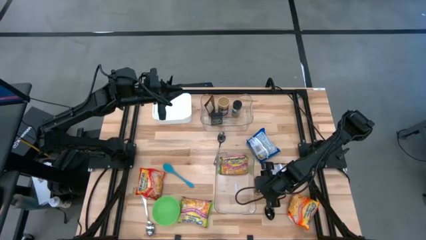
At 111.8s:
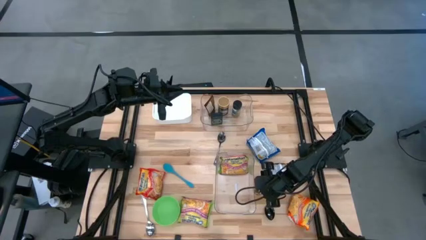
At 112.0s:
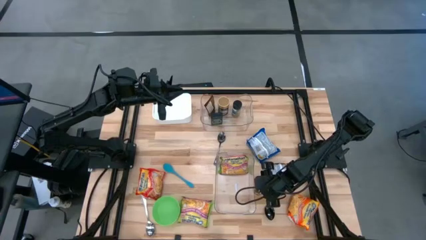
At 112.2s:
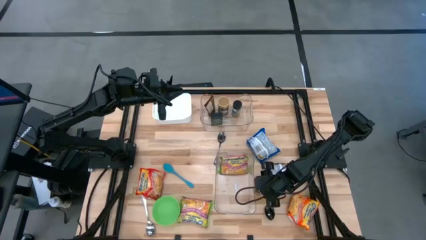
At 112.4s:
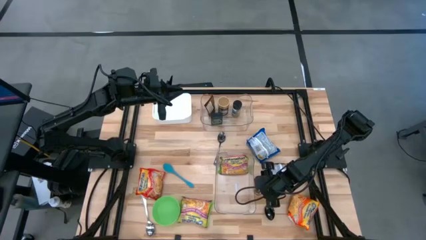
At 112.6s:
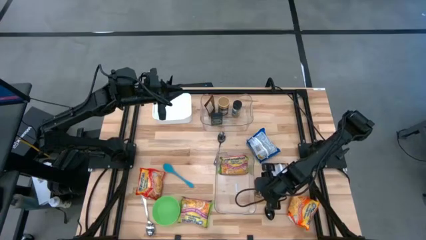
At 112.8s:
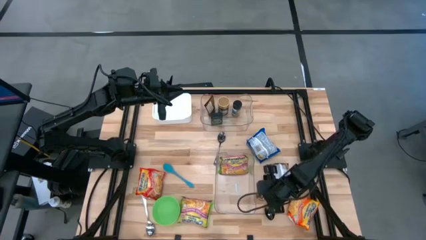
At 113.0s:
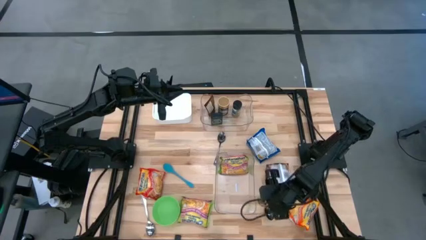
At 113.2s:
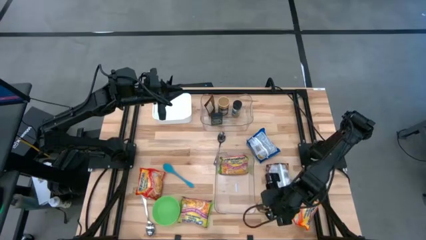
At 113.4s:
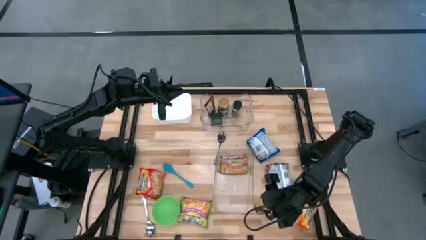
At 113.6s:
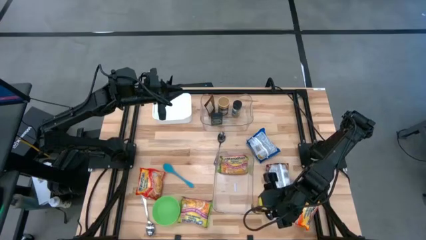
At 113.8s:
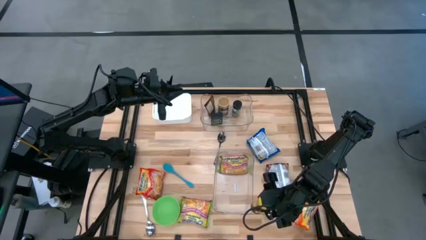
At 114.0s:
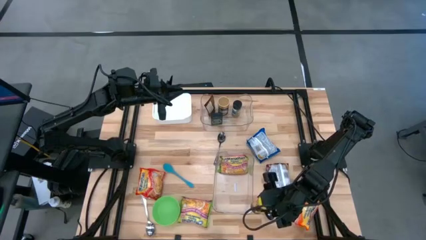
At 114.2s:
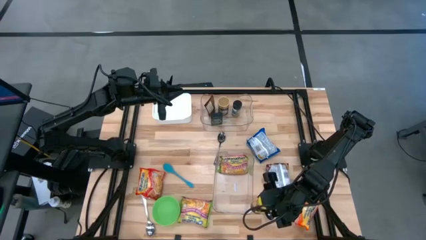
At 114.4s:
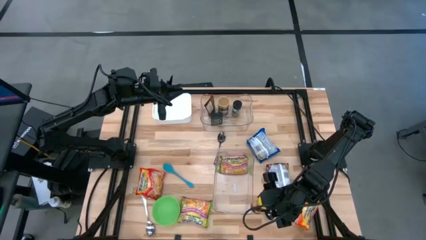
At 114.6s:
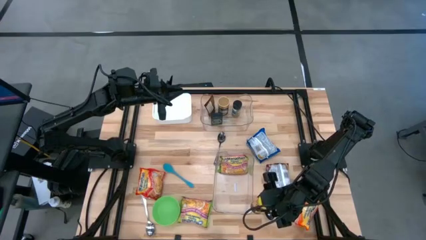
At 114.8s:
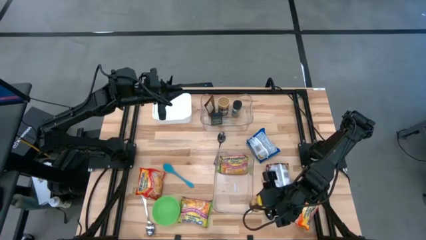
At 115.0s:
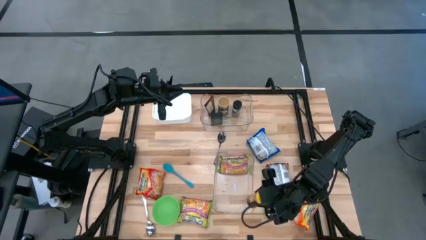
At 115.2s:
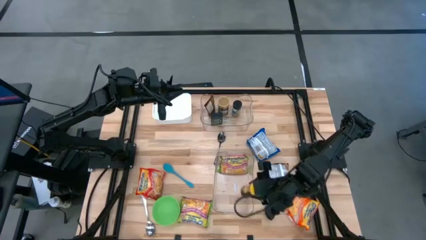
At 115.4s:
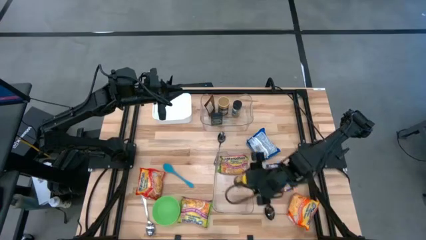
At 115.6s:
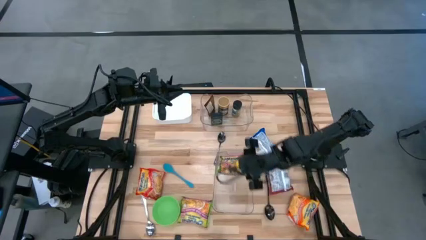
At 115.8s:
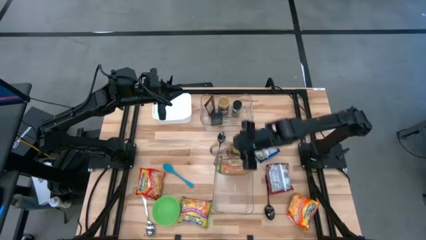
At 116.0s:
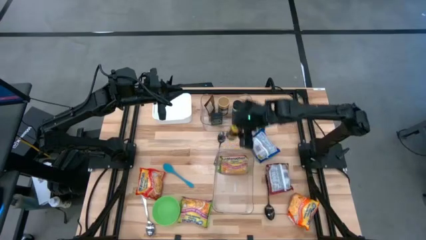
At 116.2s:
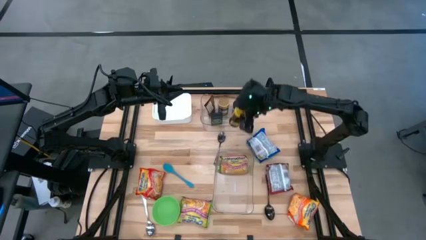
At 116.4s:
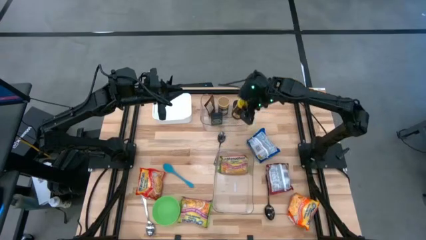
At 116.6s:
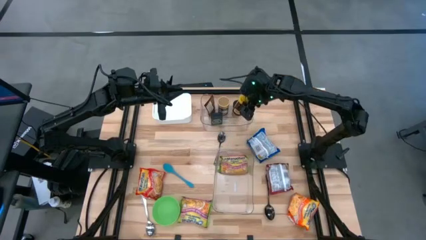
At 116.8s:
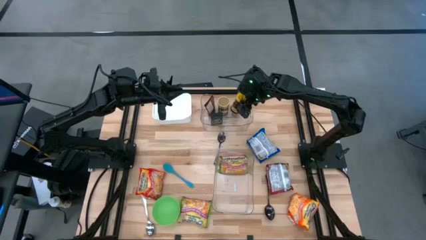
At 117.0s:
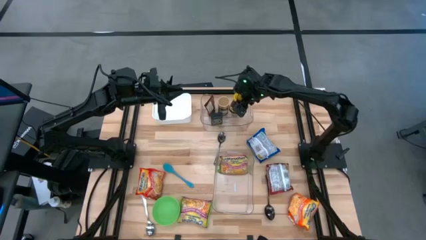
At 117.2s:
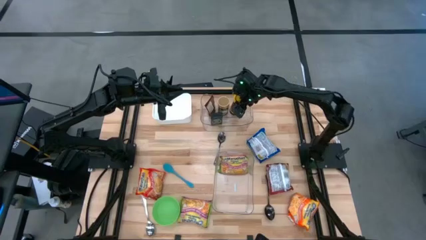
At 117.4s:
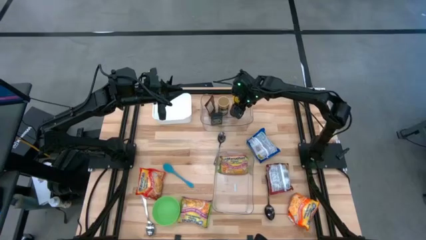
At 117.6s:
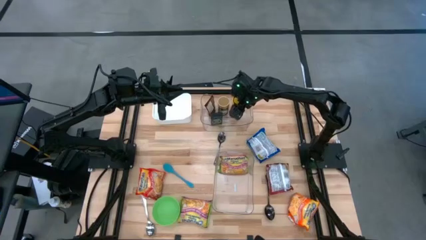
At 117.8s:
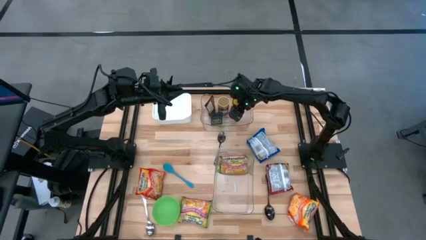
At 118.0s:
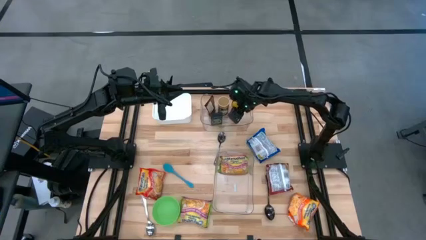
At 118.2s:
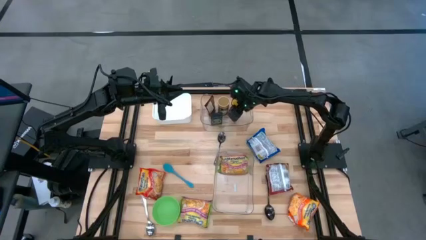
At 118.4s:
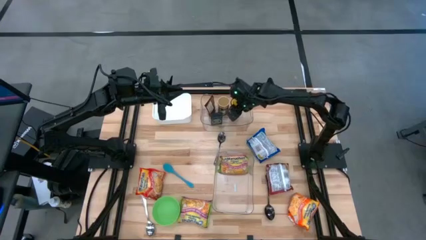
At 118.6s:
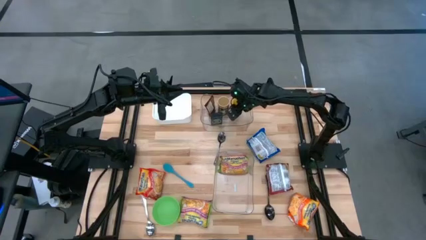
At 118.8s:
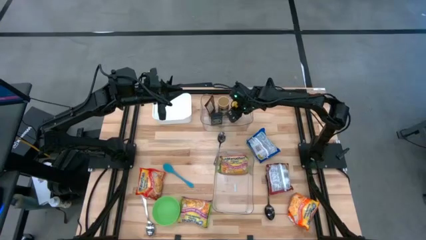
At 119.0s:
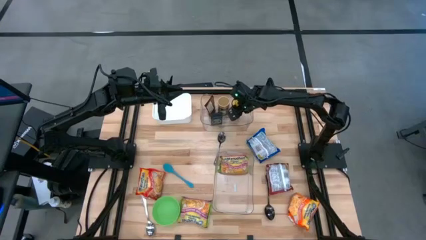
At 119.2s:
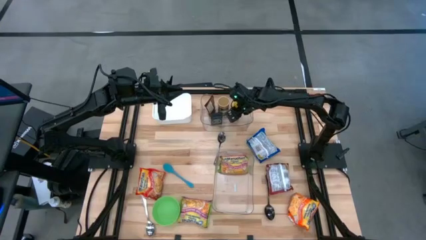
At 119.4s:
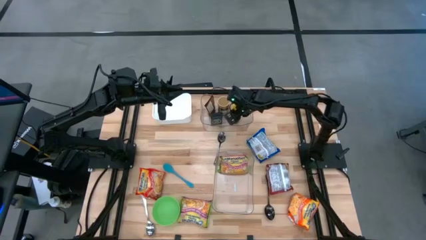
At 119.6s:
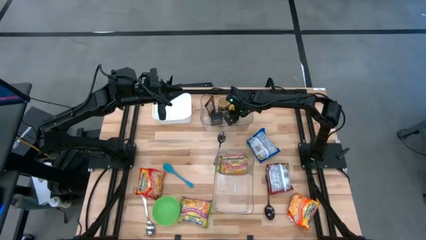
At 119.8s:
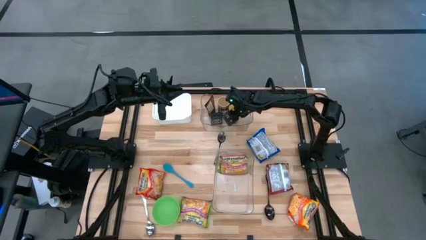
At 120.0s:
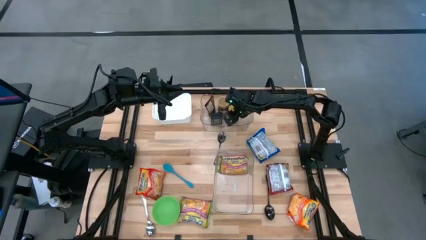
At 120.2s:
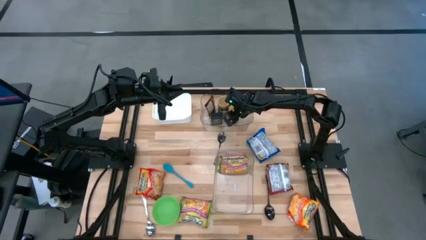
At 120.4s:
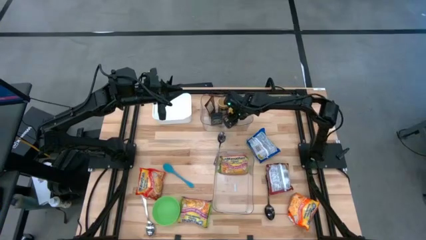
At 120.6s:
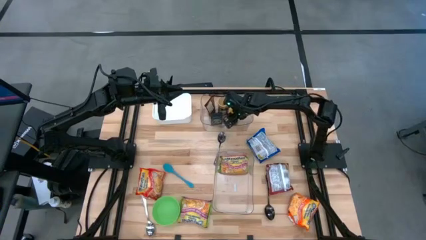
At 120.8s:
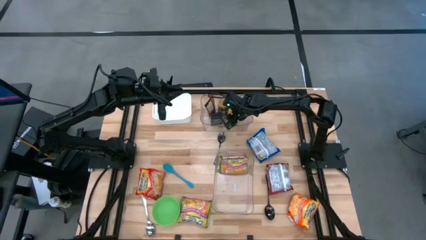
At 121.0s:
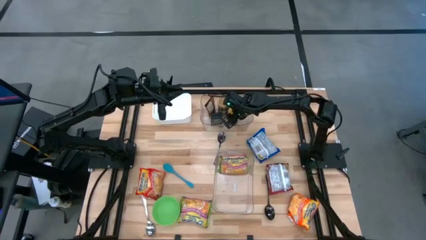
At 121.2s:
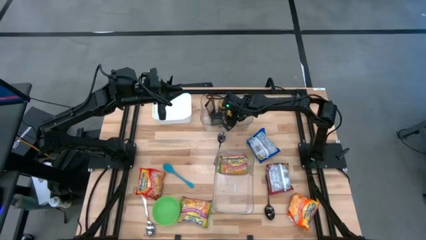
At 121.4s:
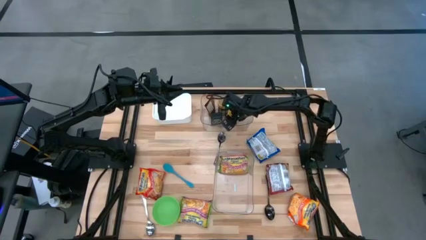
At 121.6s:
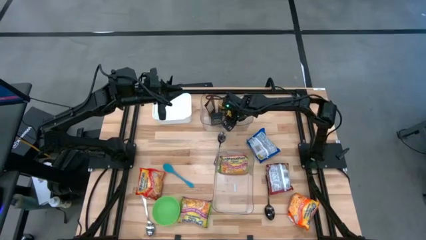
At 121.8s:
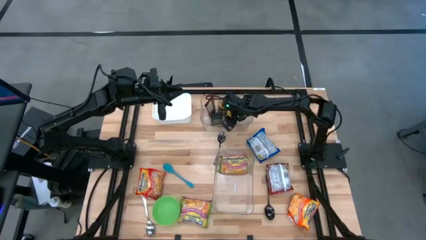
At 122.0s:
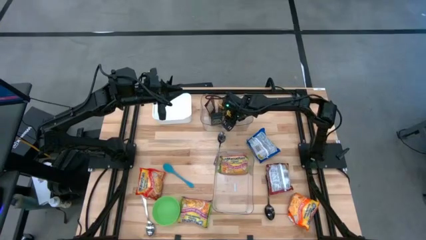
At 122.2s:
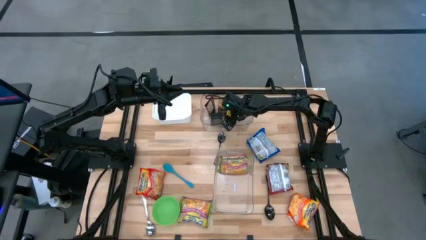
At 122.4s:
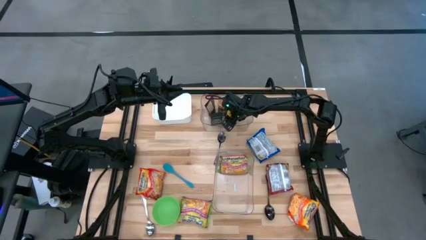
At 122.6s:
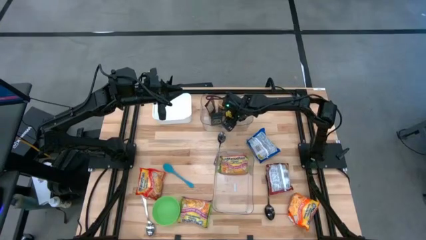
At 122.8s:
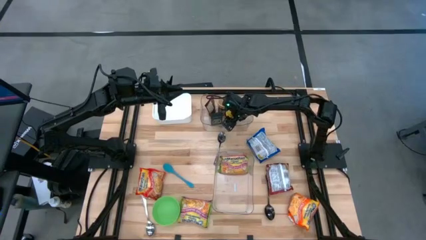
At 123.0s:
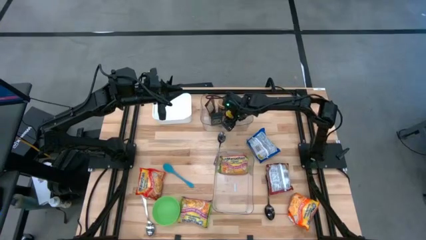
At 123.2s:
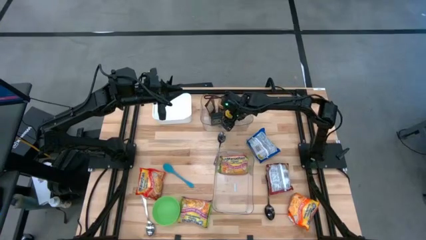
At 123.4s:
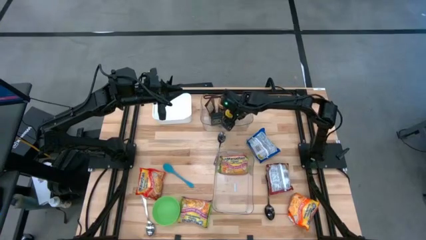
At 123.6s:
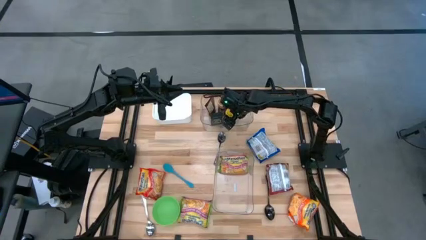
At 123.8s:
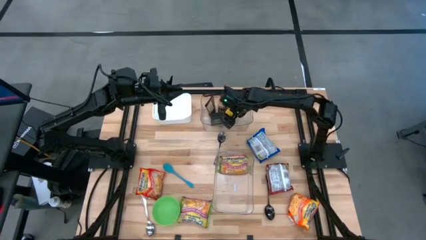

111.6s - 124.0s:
Task: Pick & Place Food Item
Put the yellow seasoning bottle into the top transparent bin
